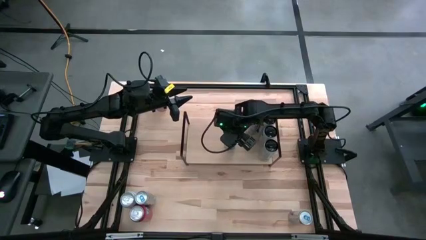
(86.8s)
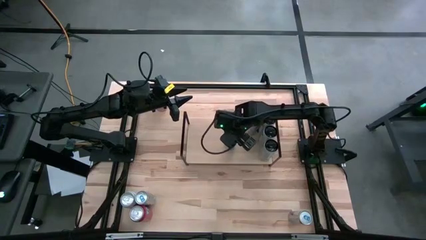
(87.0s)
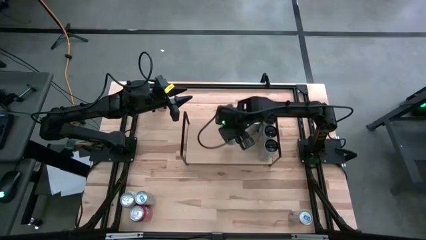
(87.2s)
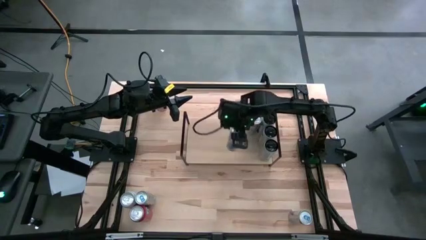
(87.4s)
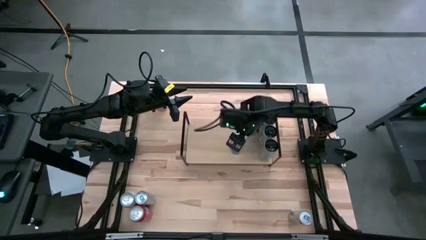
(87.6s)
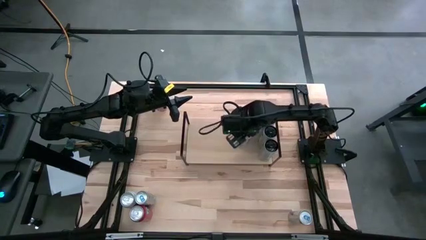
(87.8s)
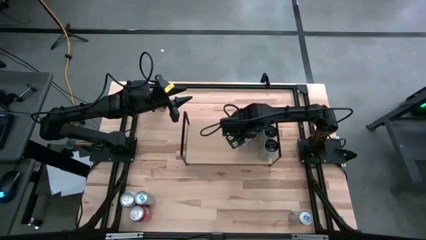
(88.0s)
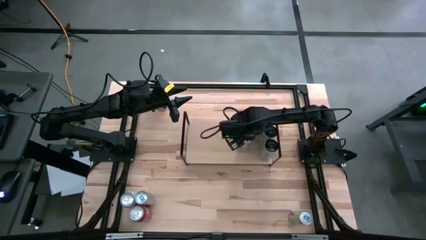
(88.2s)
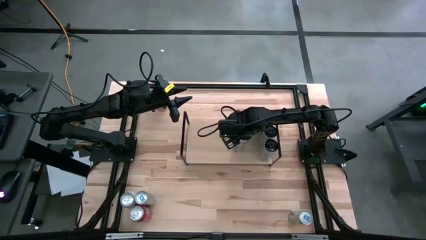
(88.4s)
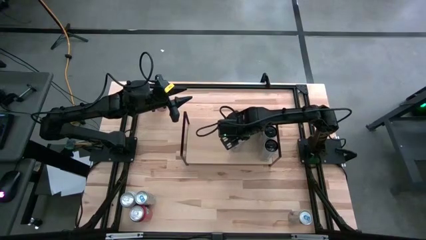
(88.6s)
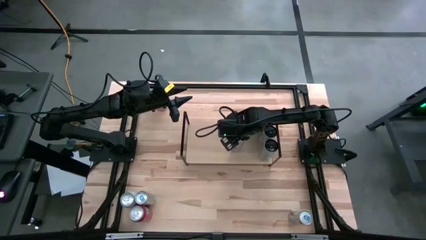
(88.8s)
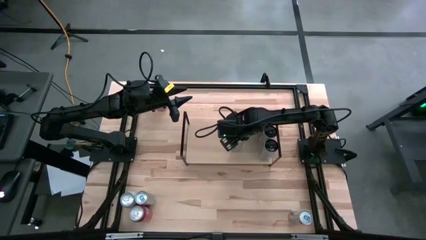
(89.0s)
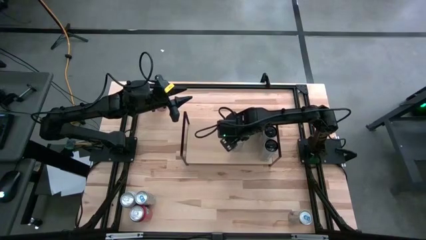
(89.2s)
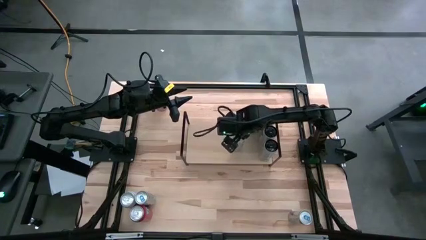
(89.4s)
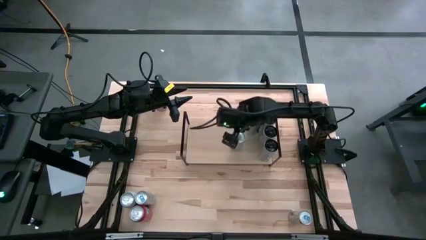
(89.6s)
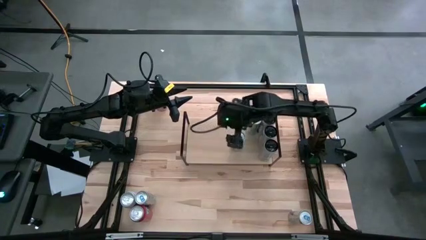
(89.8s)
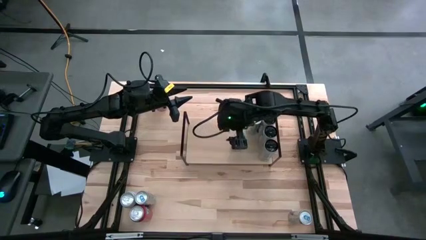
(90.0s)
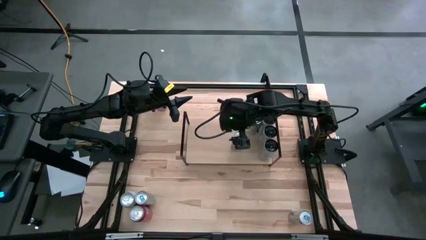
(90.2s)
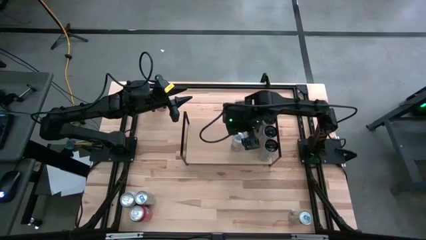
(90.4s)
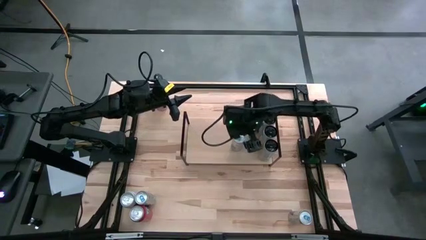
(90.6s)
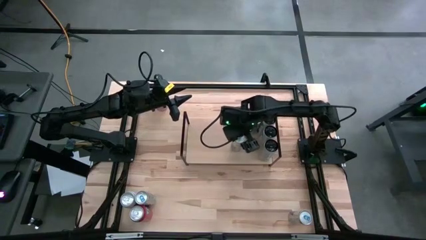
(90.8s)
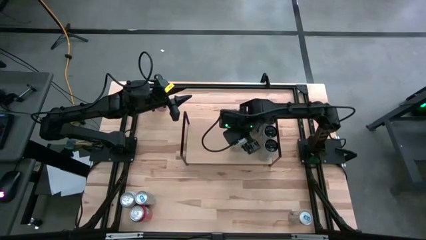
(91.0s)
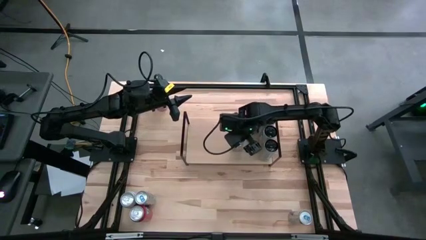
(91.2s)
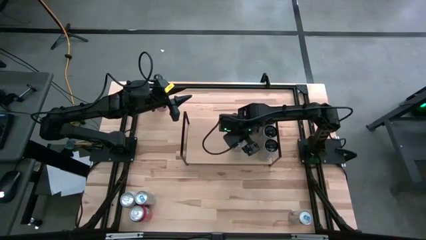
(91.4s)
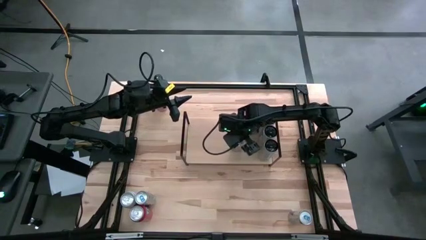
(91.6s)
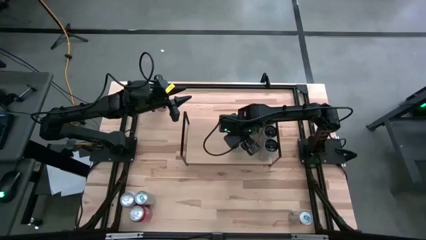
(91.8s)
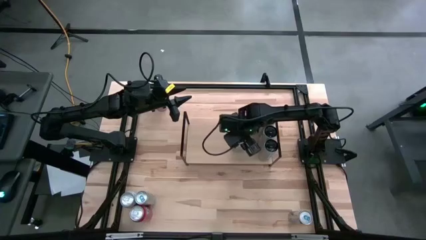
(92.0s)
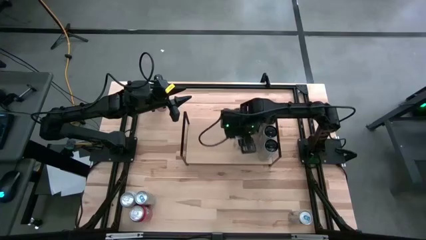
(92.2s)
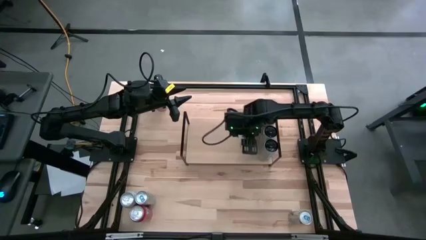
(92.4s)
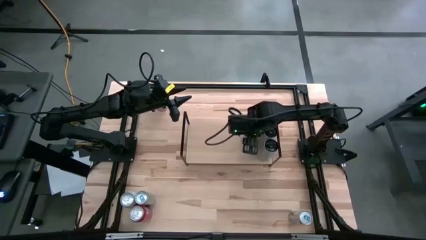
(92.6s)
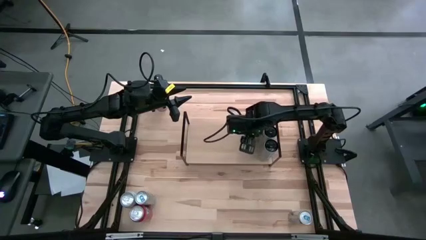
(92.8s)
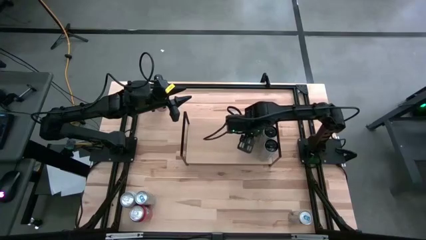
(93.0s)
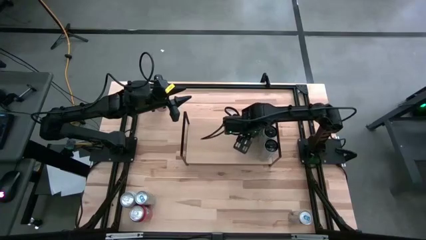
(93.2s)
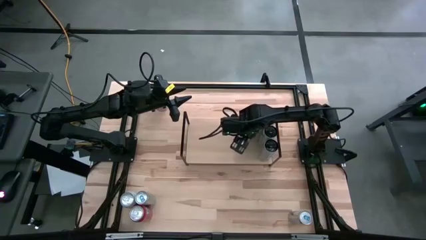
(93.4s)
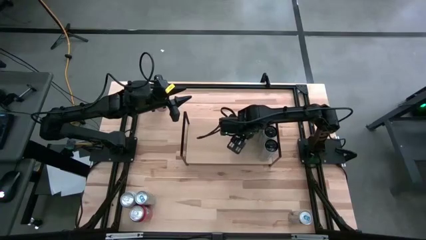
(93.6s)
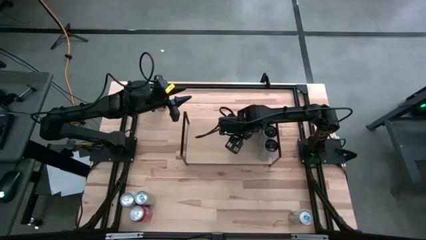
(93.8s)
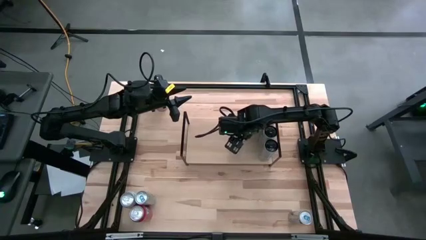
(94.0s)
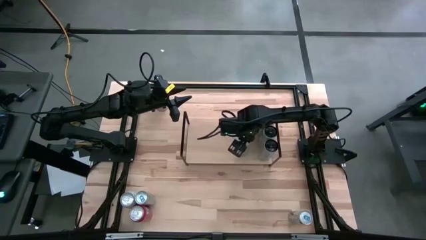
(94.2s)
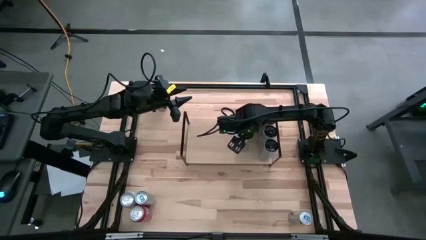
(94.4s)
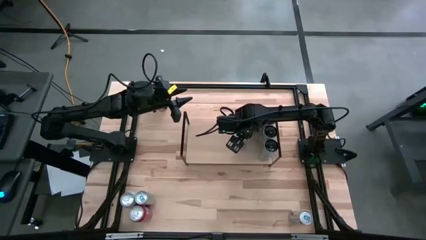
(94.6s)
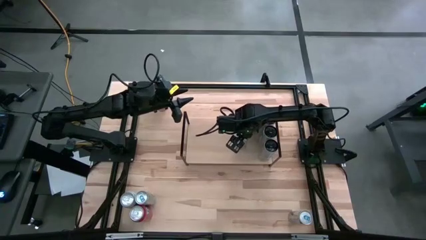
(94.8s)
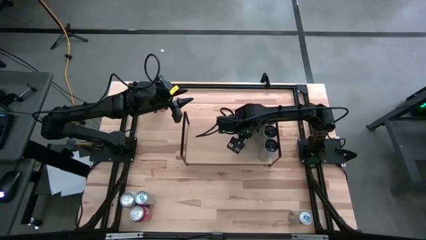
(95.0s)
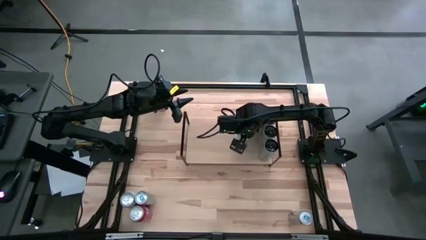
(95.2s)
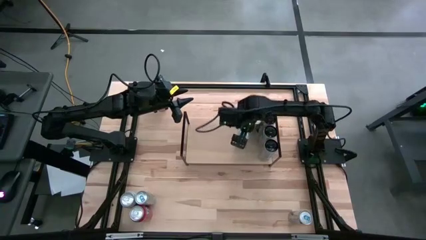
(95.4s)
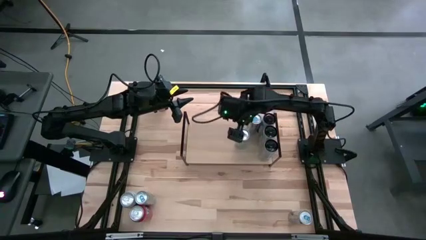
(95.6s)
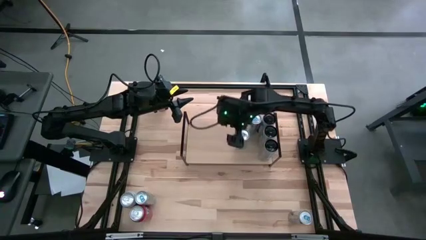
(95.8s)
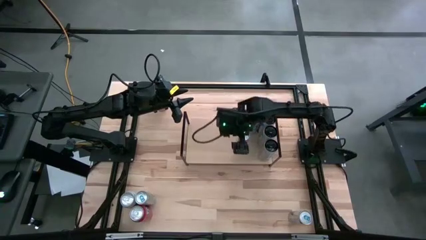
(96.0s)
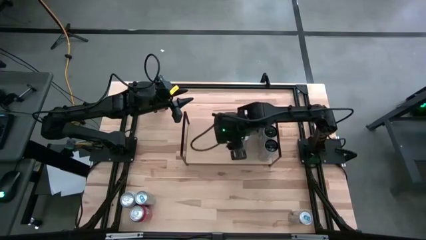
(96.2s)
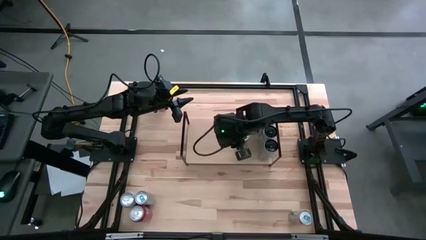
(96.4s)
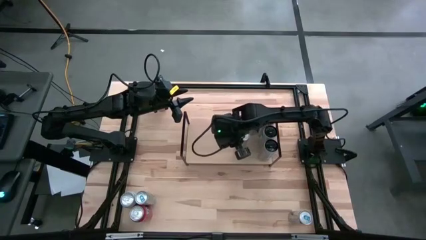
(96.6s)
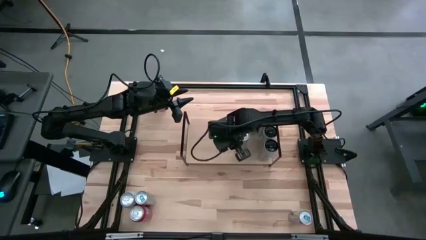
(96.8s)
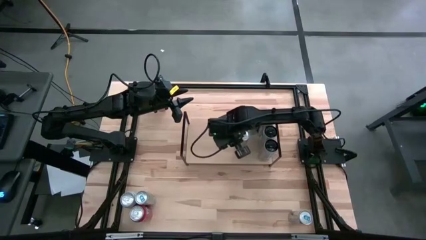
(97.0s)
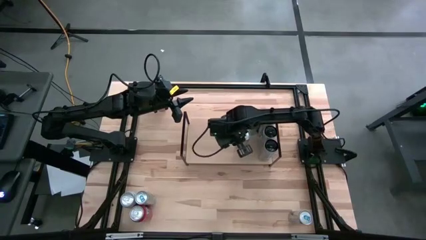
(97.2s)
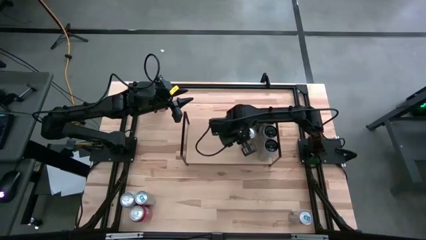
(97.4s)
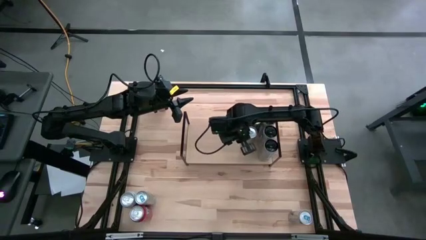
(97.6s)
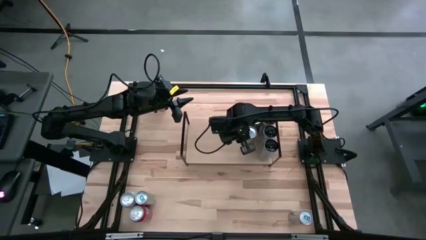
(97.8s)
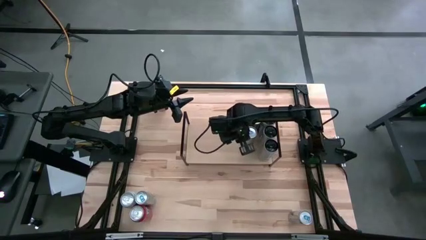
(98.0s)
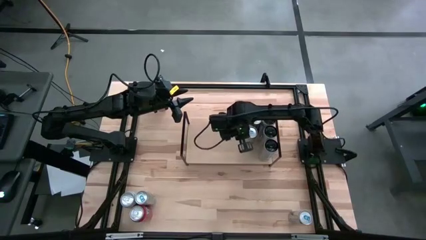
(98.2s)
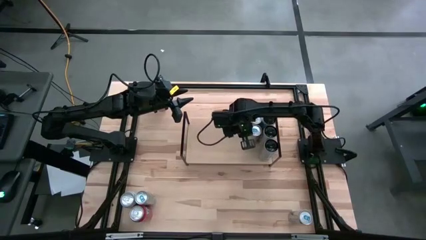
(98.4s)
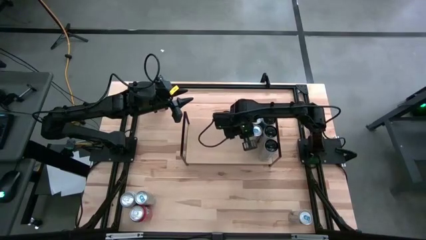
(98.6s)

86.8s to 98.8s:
Task: Place canned beverage on shelf
Put the blue soda can on the shelf aligned with the other blue soda can

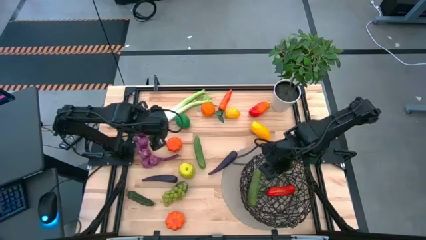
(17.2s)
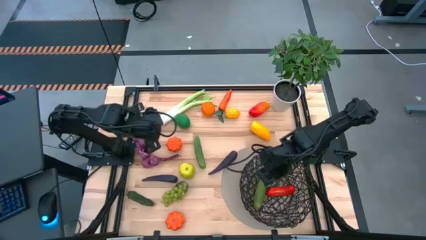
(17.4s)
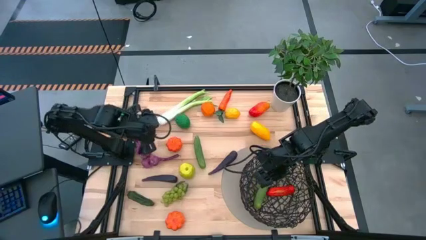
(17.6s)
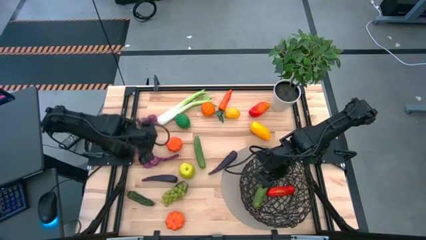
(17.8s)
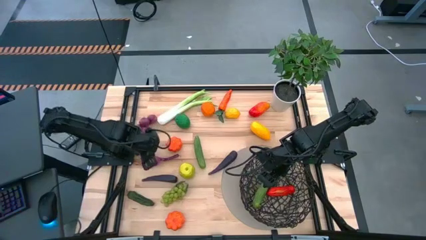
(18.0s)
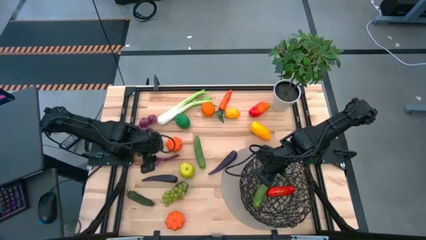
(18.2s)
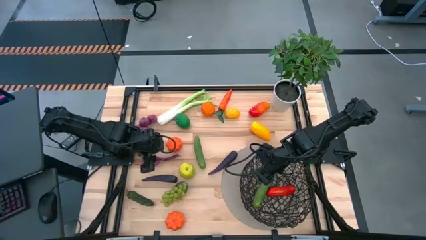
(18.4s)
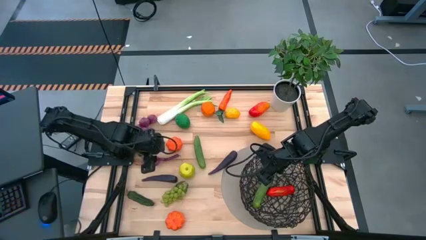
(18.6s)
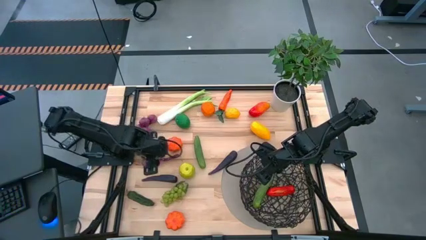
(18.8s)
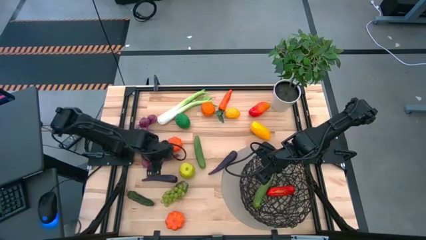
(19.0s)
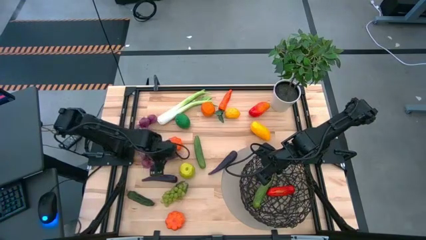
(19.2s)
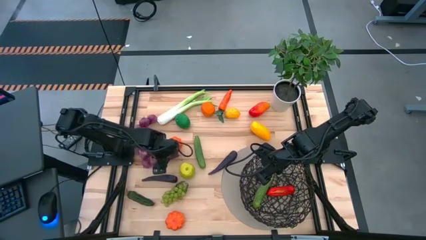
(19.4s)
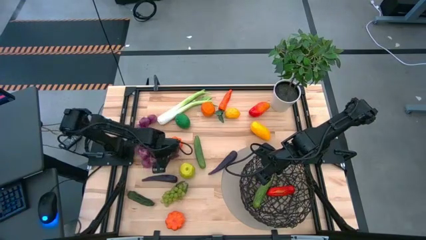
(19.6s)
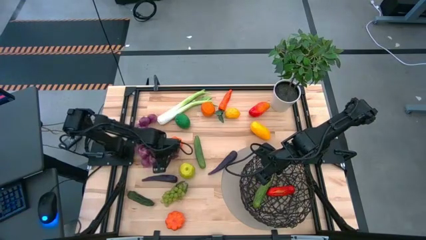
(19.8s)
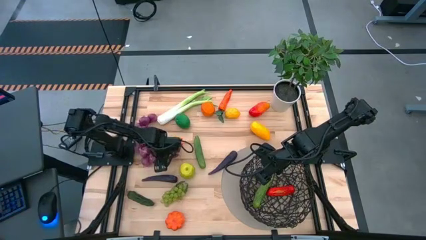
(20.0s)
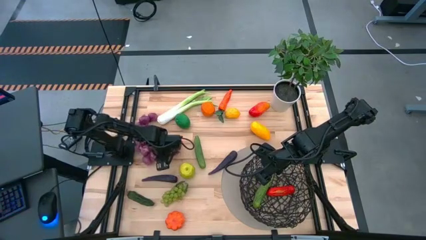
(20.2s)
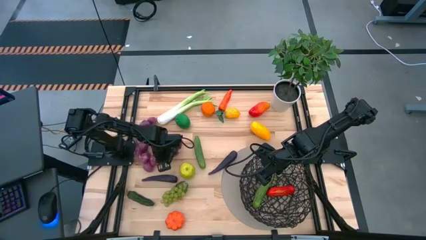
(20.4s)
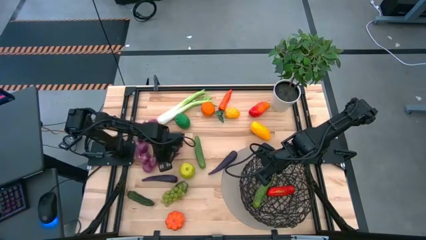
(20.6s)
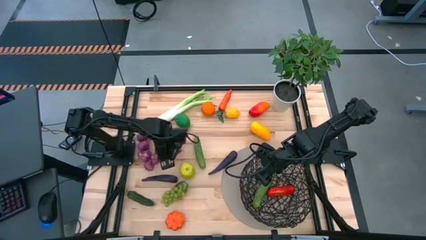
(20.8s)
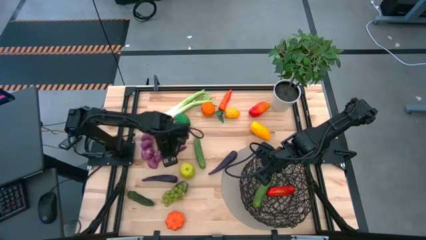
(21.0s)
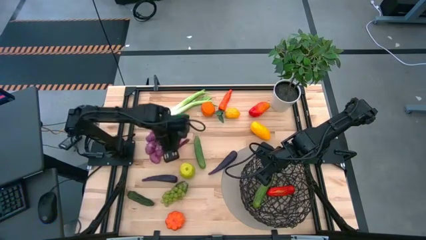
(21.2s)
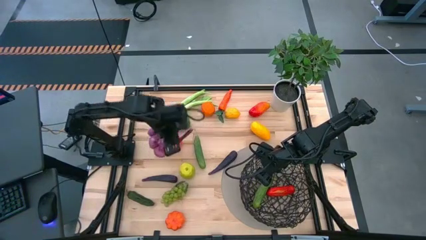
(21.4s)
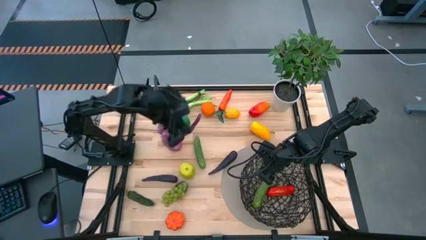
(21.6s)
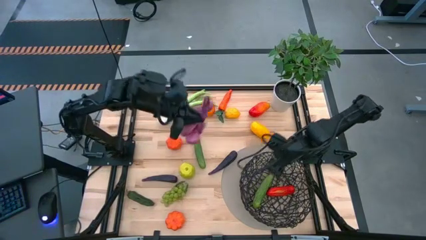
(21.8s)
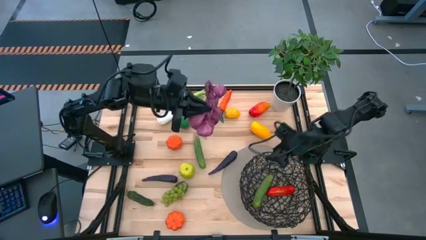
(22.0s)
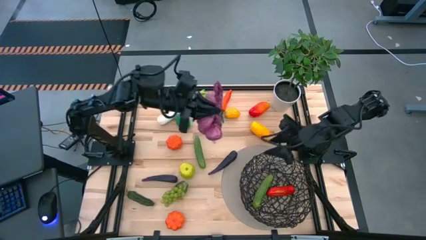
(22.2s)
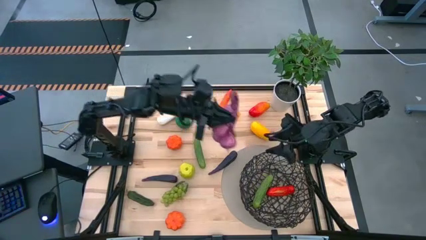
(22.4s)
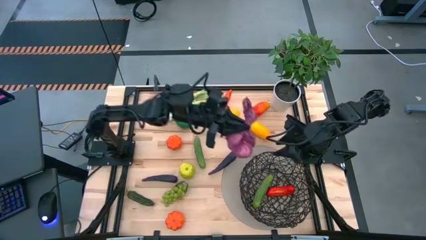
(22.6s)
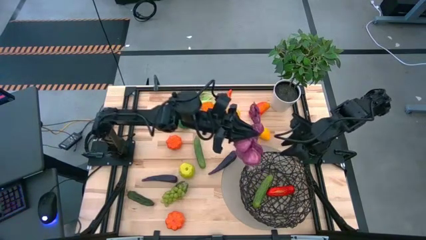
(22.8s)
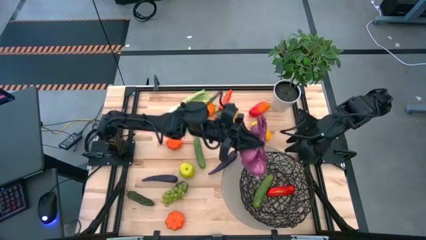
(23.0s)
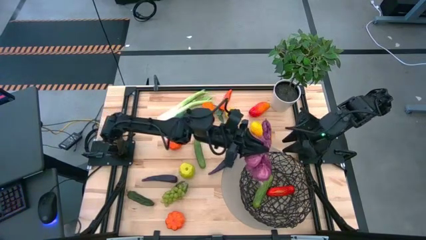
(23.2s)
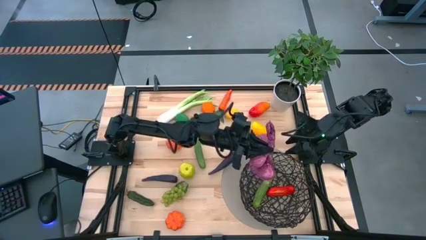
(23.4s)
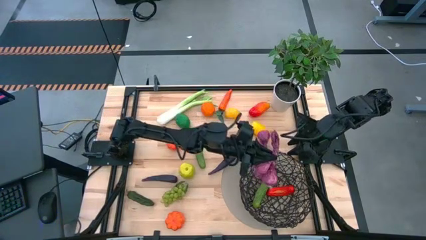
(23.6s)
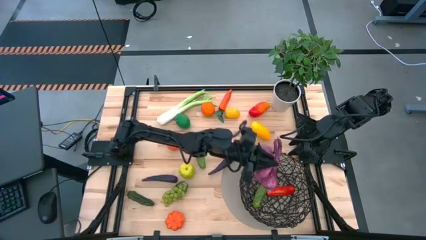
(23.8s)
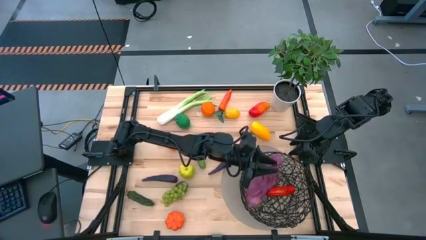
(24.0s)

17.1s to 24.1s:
Task: Build produce basket
Put the purple garlic into the black basket
